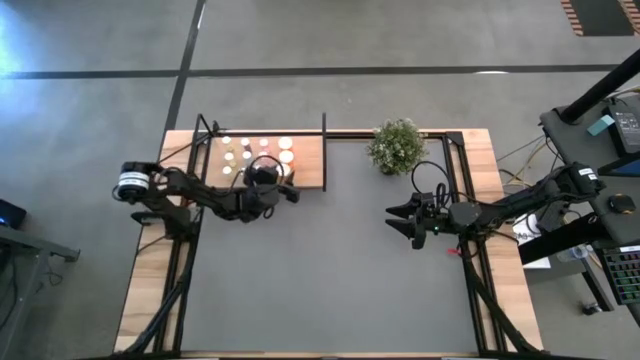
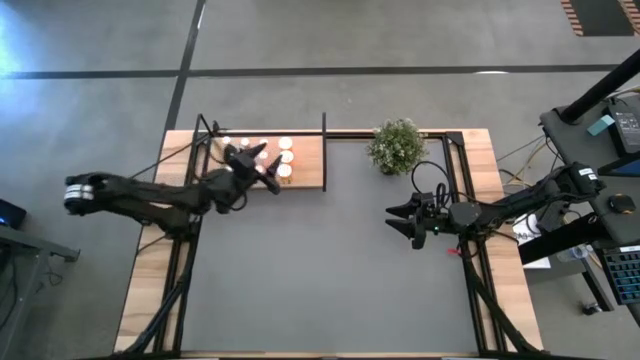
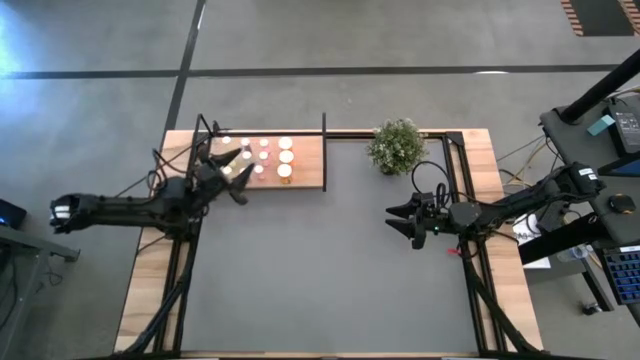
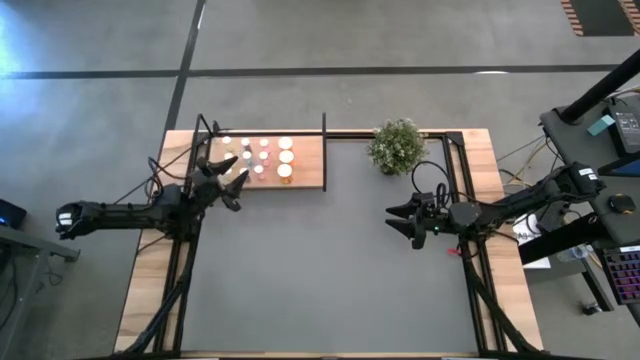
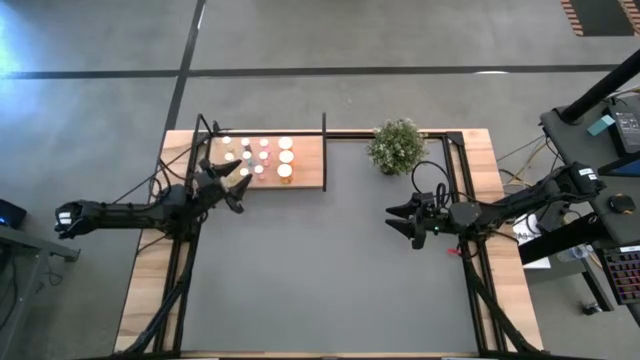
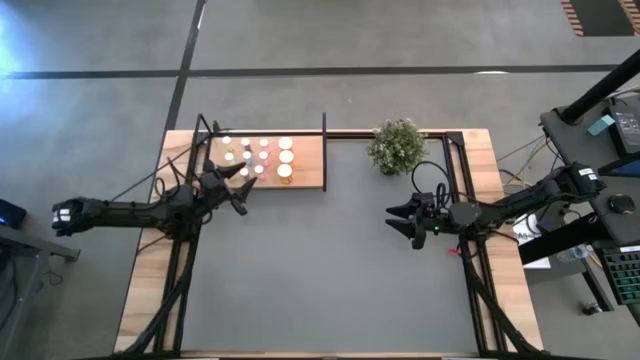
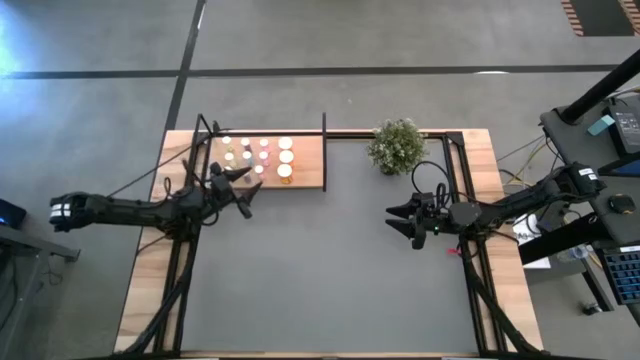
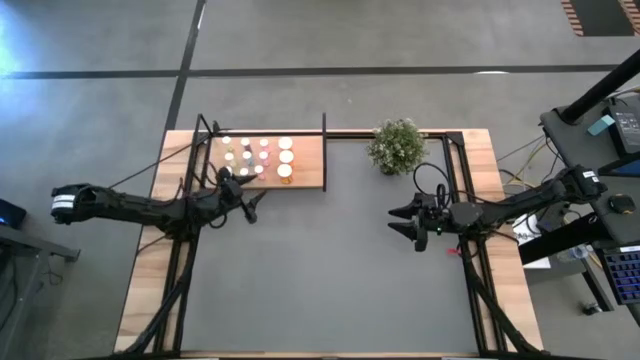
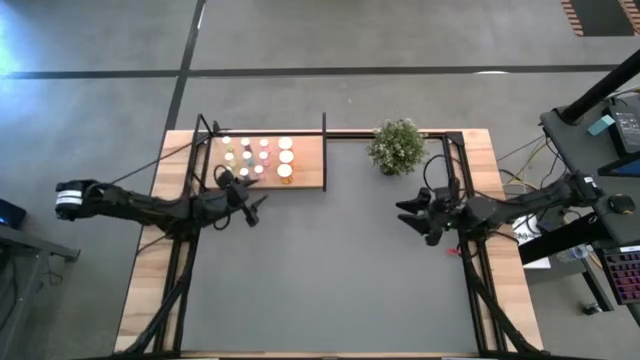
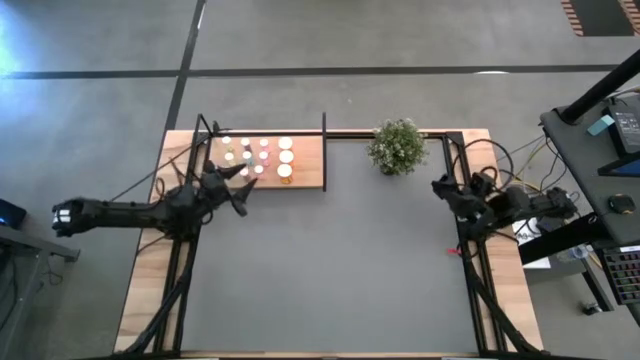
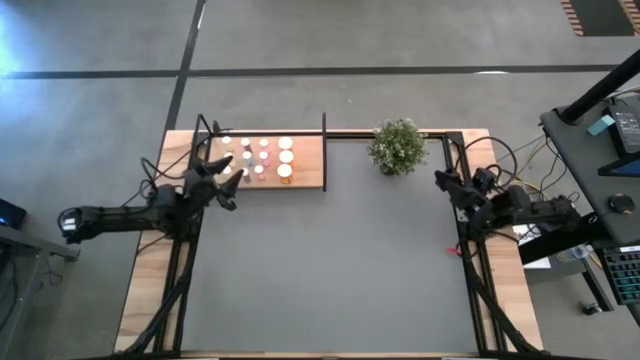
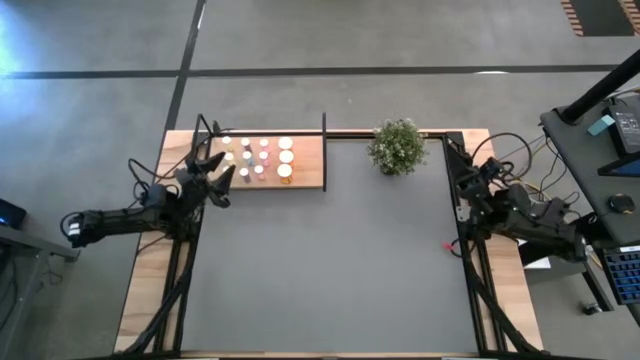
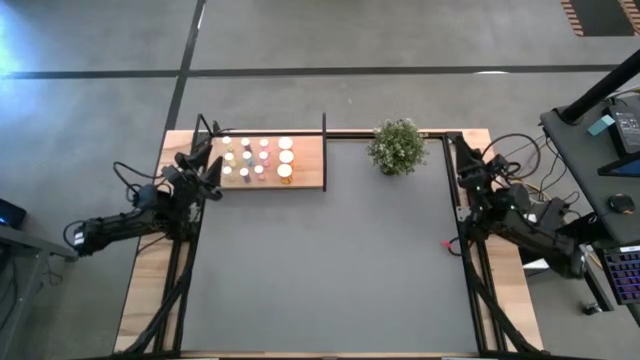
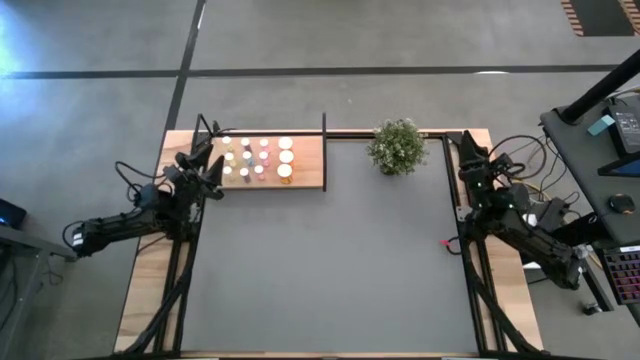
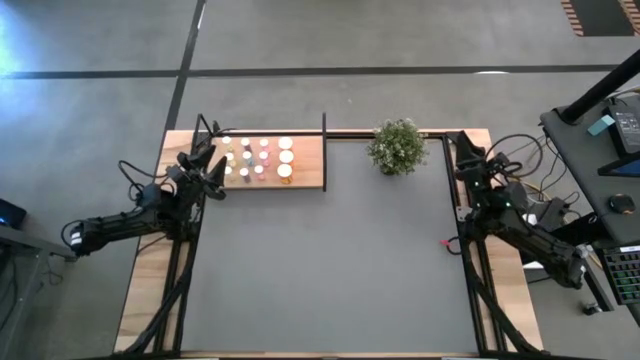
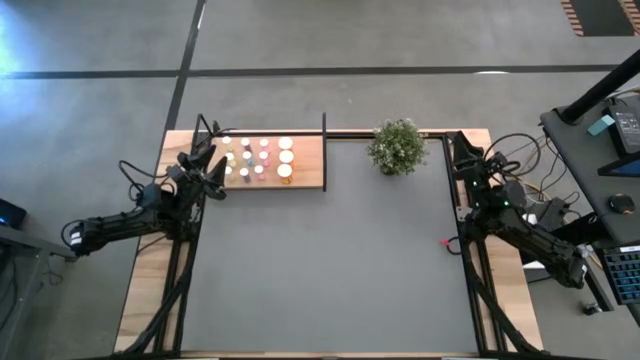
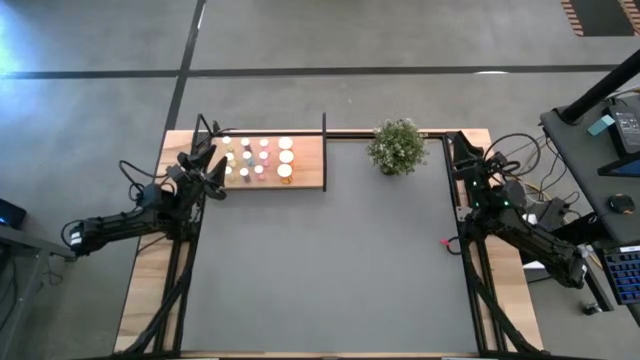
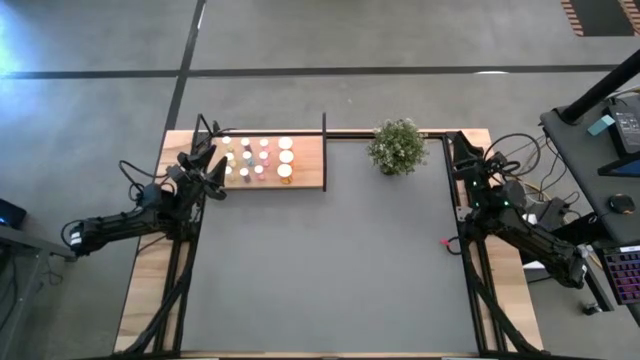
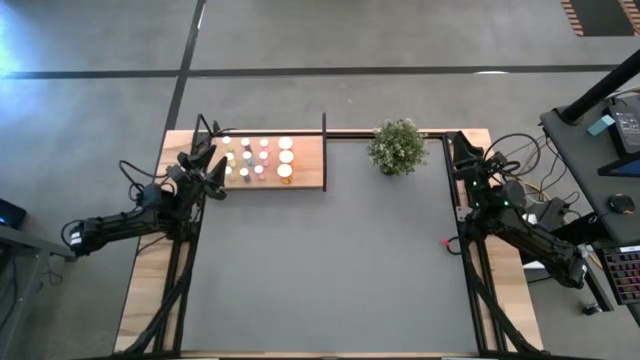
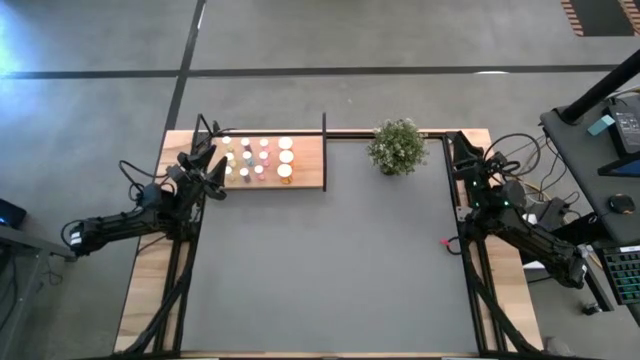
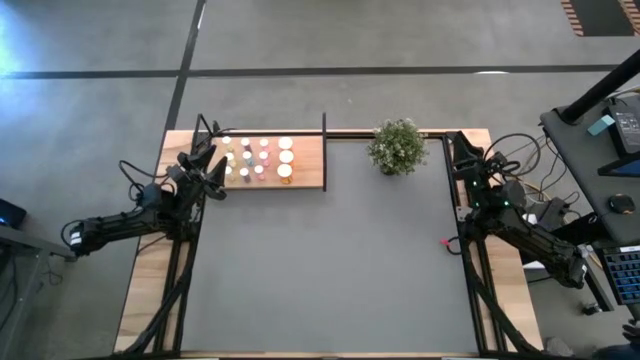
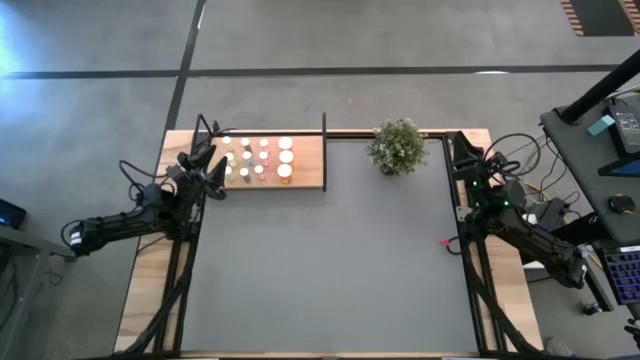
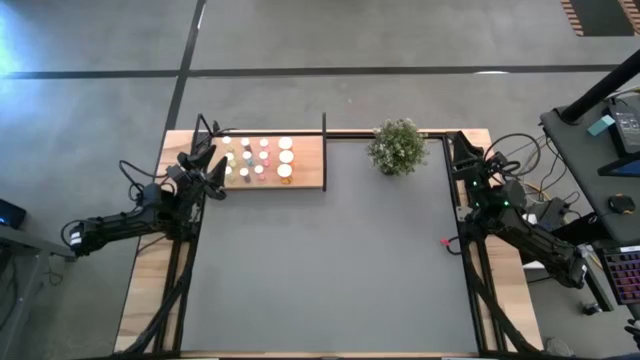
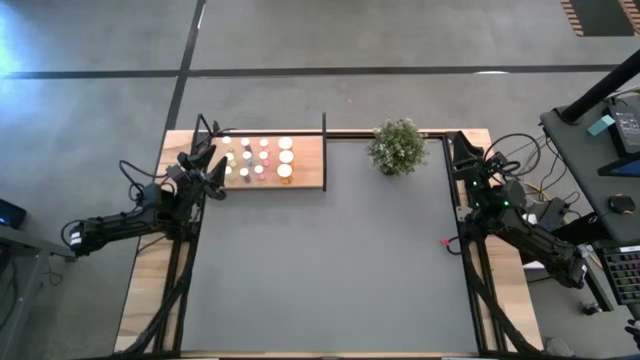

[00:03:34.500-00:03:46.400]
Task: Pick and place medicine bottles onto shelf by color
Return to Home Position

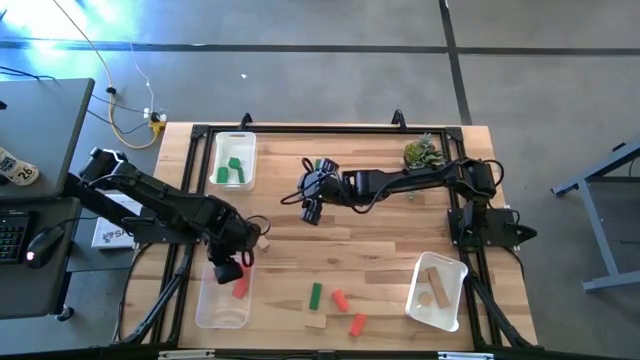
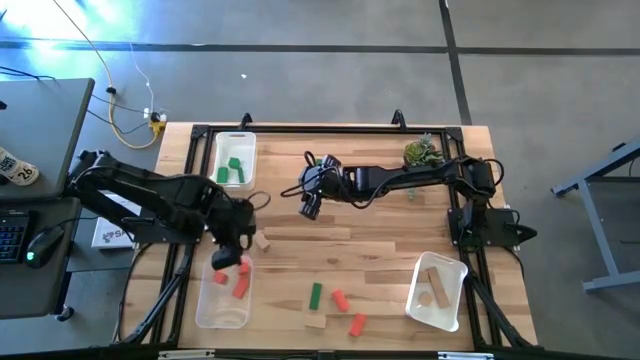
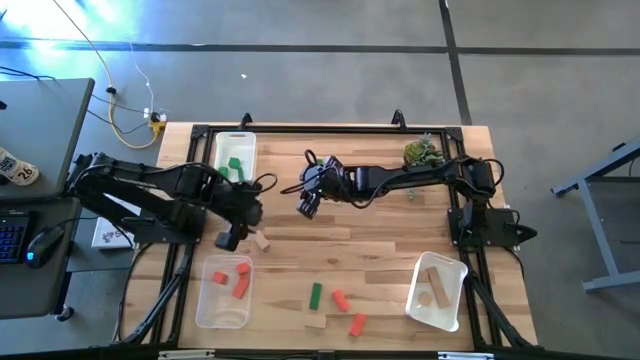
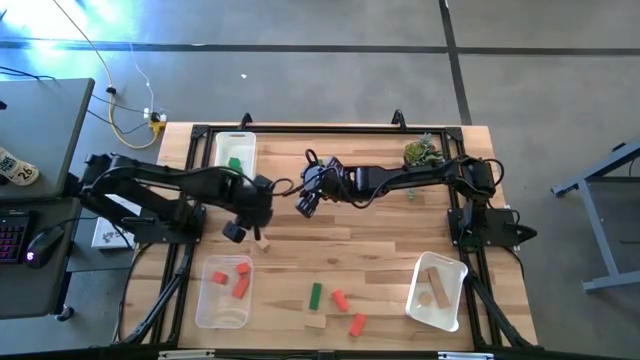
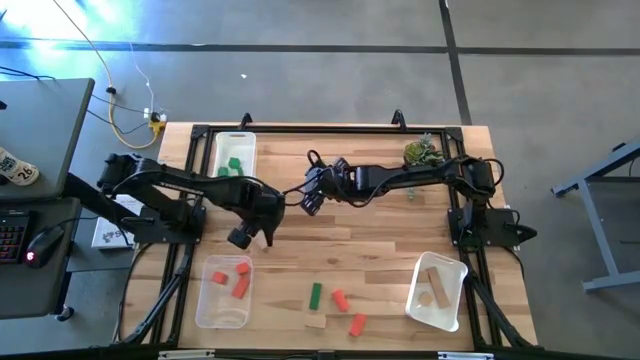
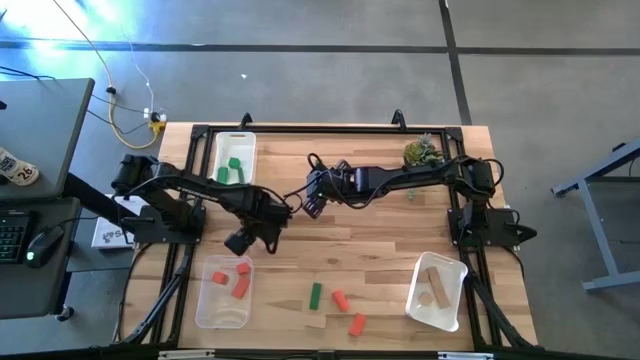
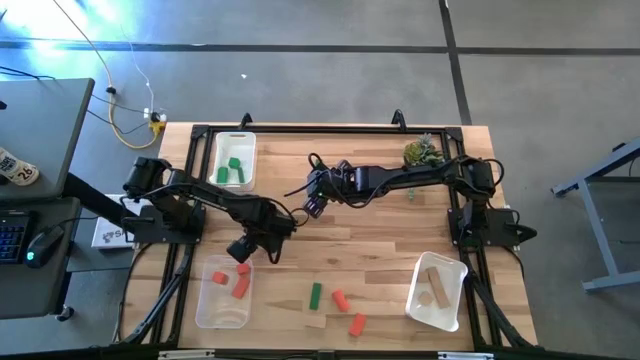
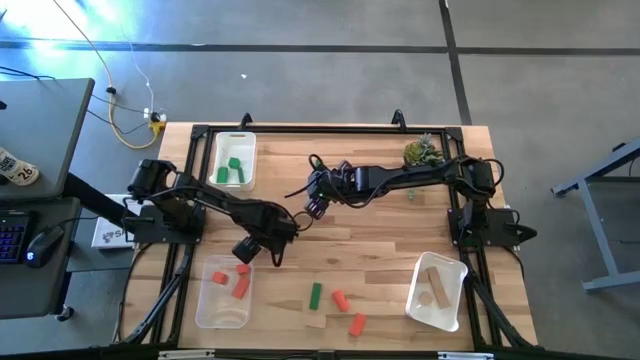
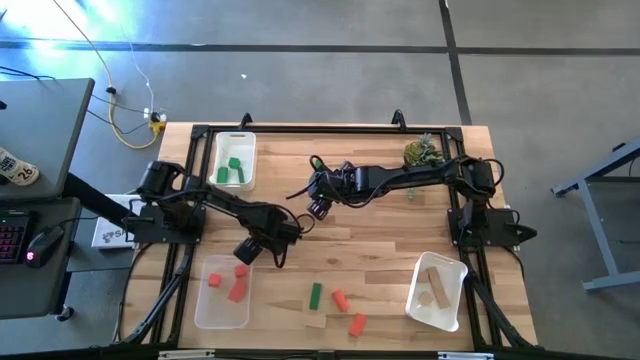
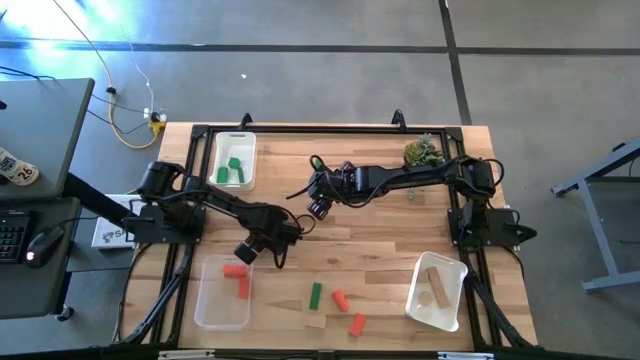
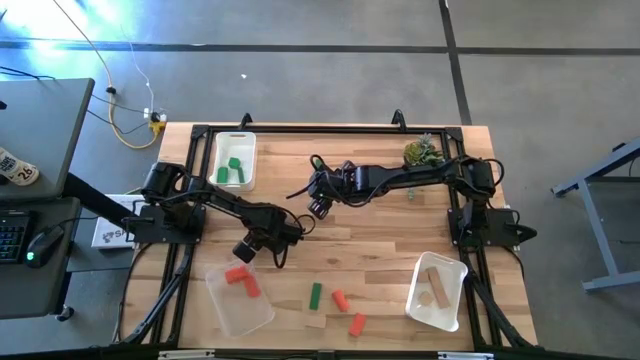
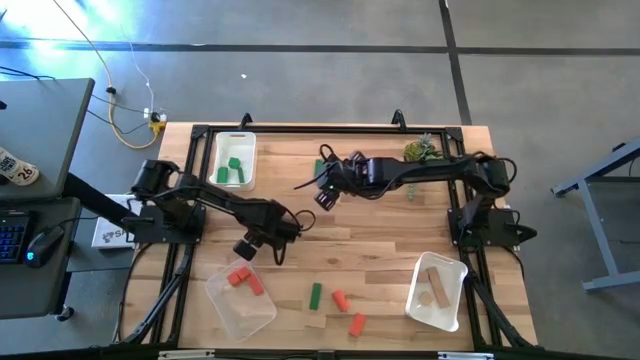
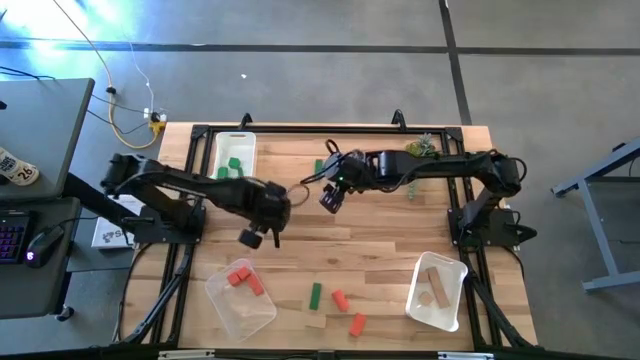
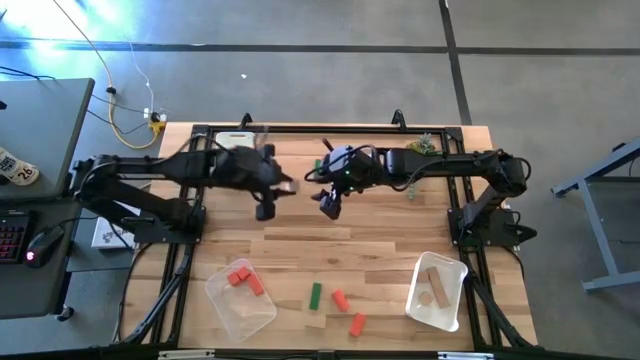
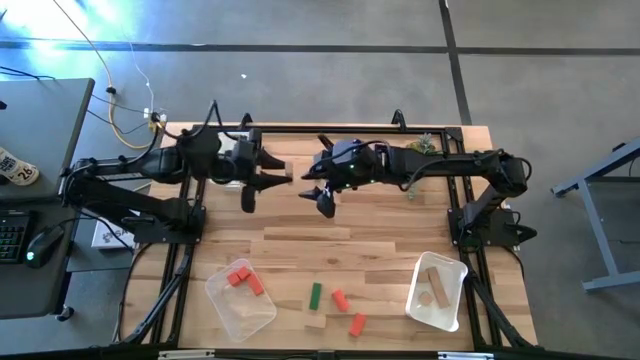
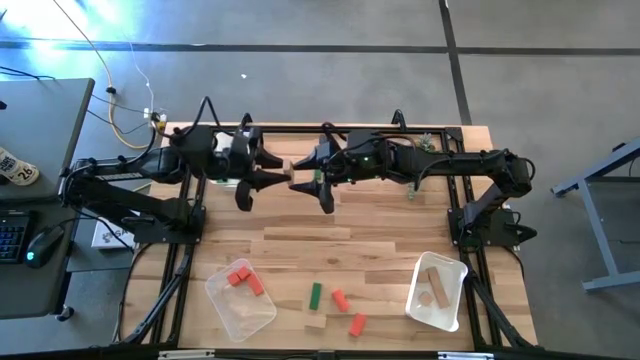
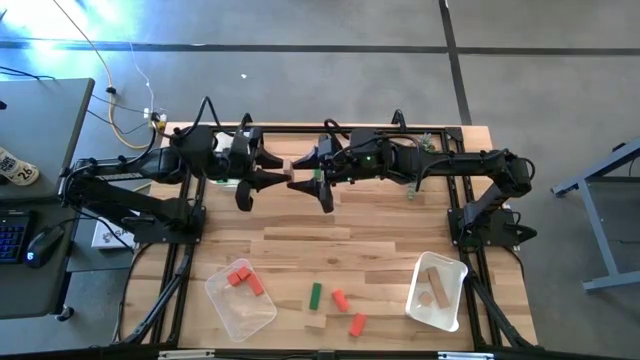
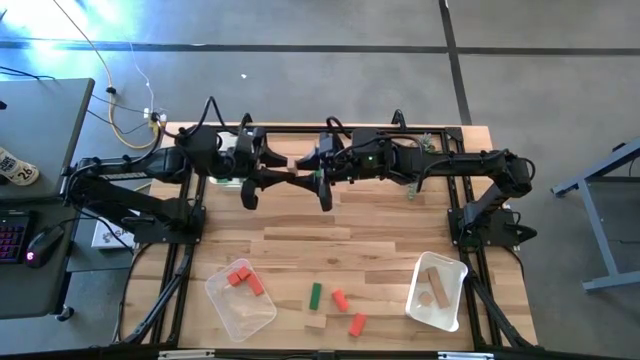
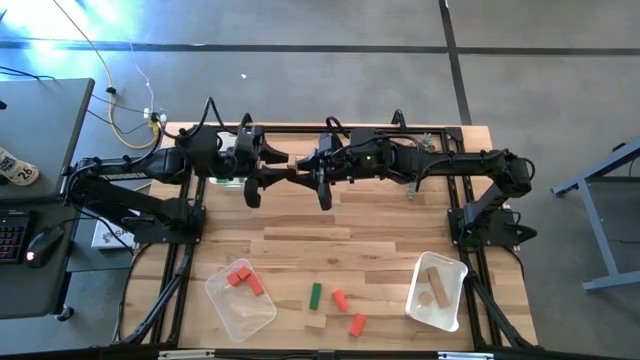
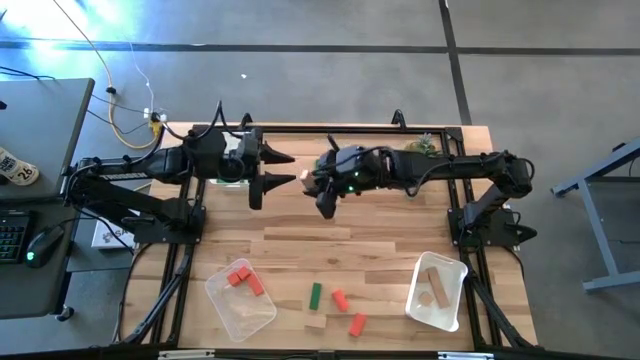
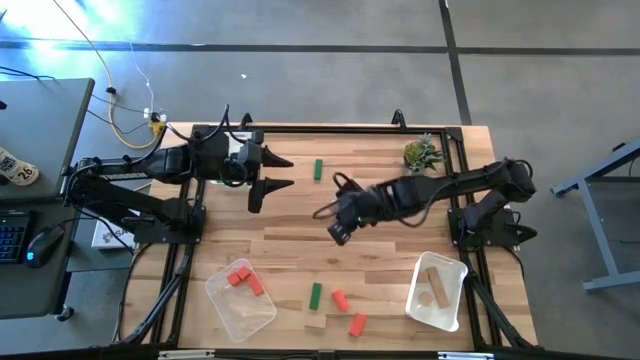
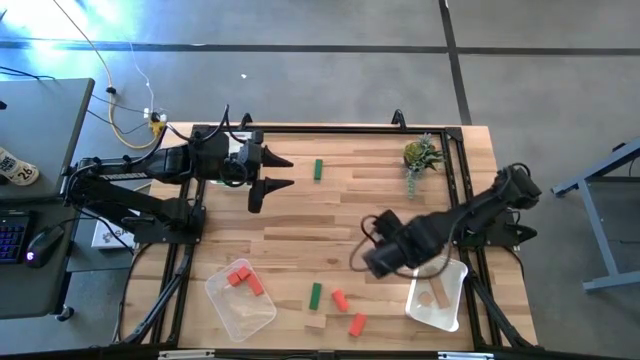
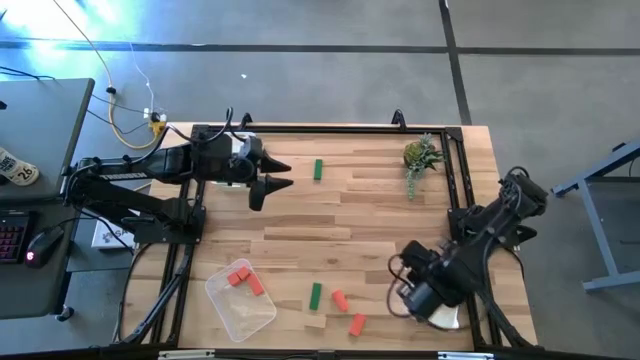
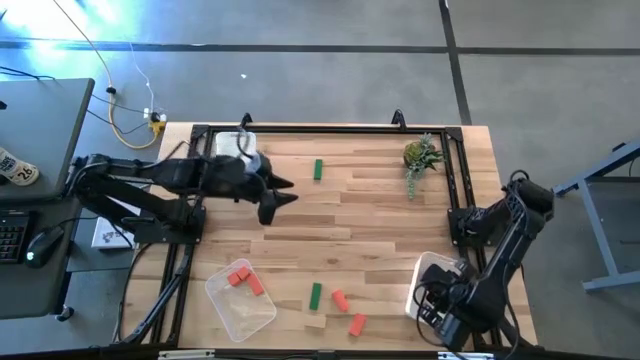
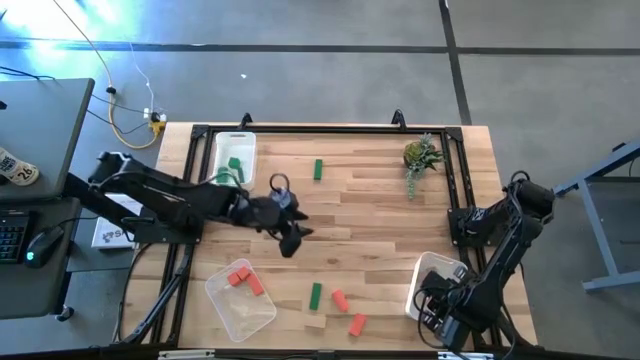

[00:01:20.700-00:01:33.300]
Task: Sort & place blocks by color
Put the brown block into the bottom white bin
